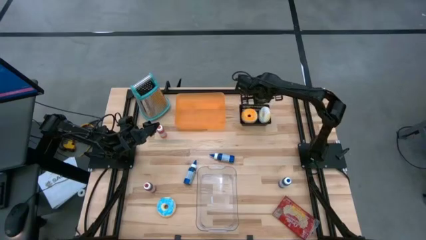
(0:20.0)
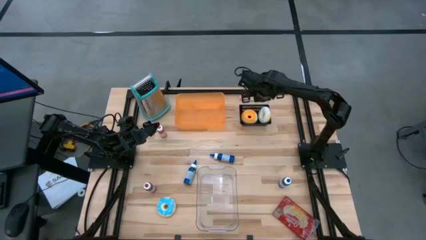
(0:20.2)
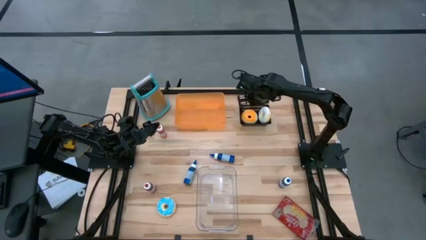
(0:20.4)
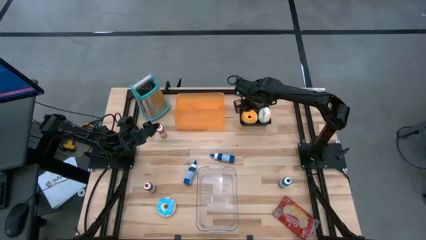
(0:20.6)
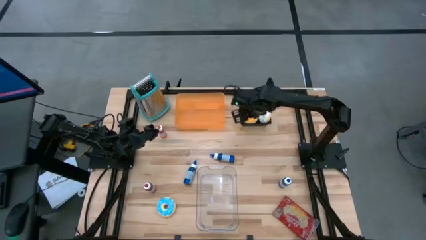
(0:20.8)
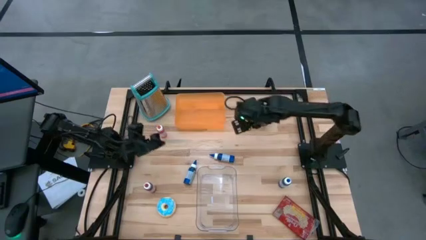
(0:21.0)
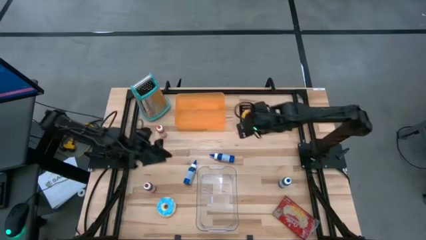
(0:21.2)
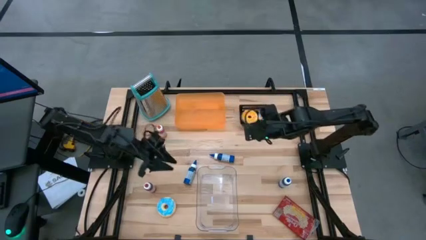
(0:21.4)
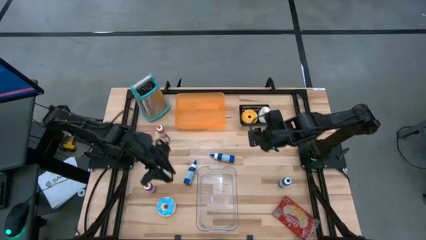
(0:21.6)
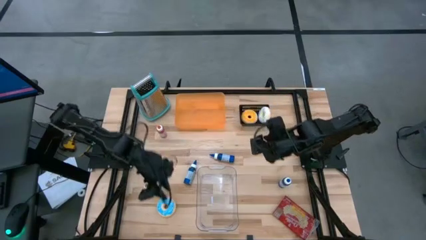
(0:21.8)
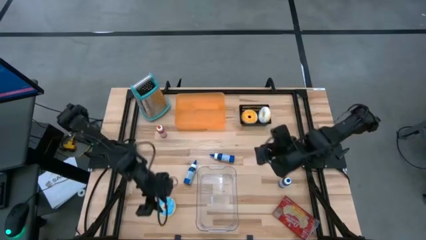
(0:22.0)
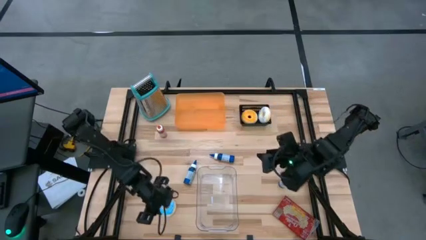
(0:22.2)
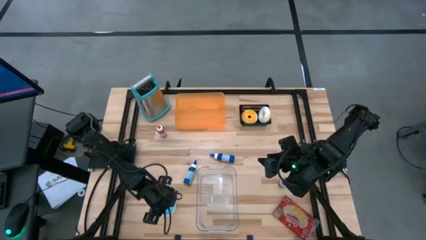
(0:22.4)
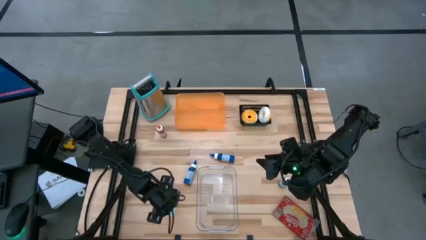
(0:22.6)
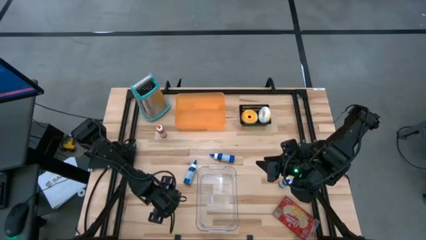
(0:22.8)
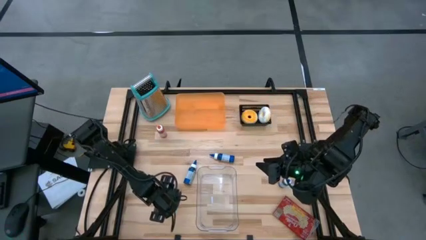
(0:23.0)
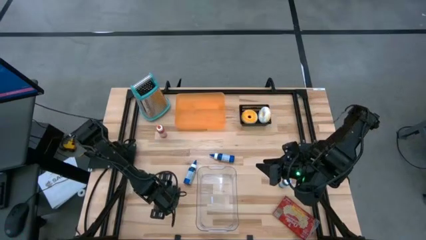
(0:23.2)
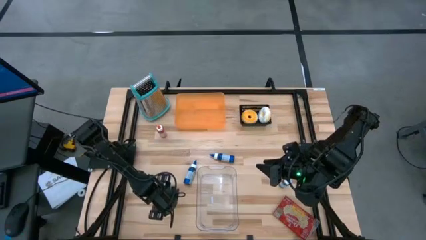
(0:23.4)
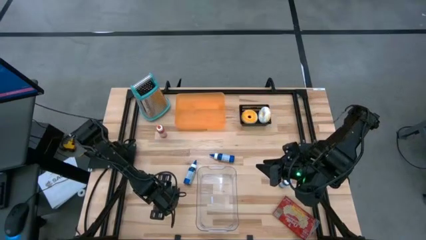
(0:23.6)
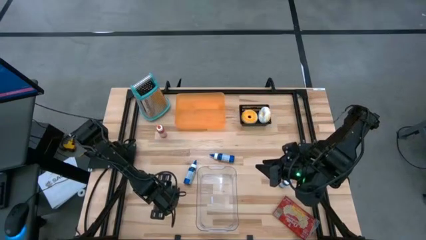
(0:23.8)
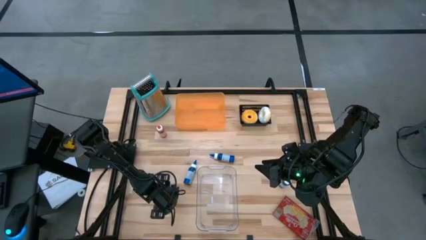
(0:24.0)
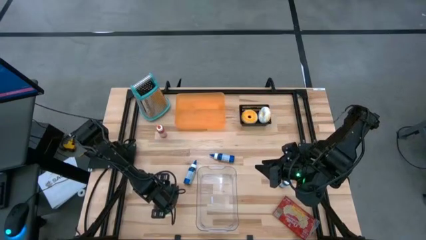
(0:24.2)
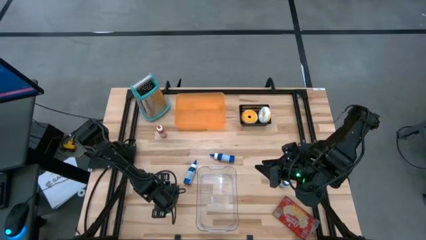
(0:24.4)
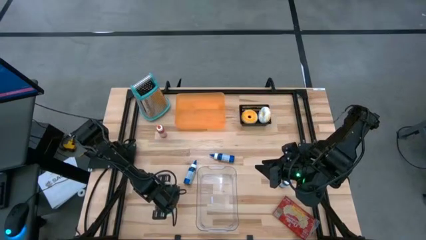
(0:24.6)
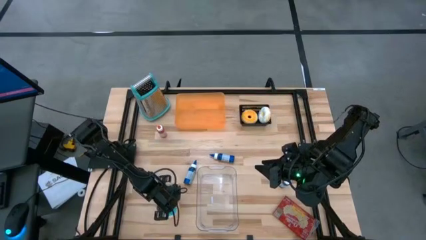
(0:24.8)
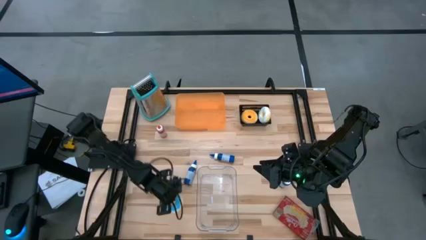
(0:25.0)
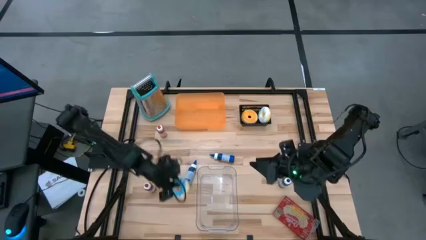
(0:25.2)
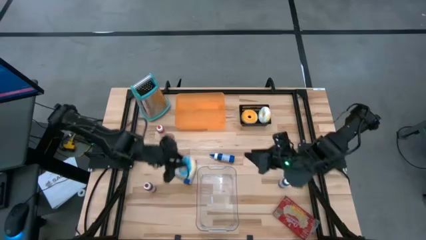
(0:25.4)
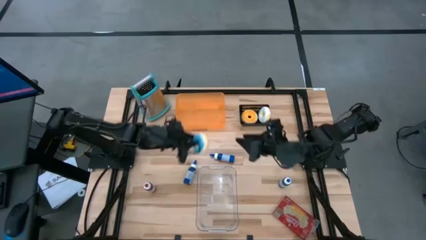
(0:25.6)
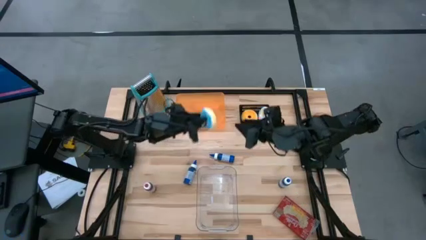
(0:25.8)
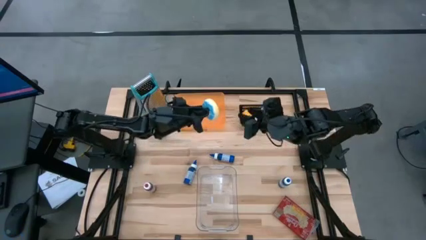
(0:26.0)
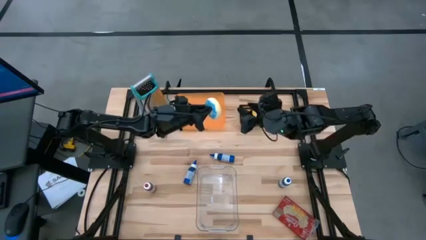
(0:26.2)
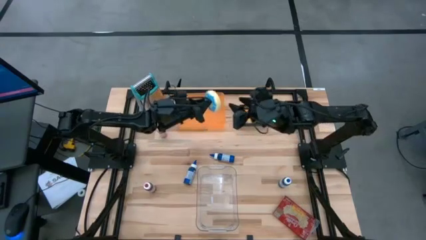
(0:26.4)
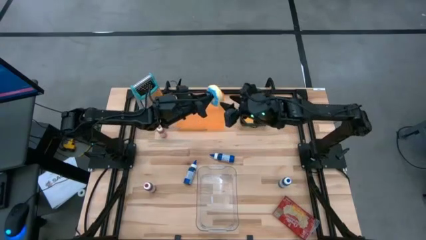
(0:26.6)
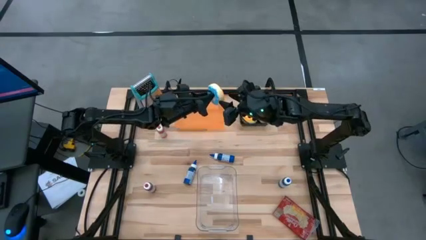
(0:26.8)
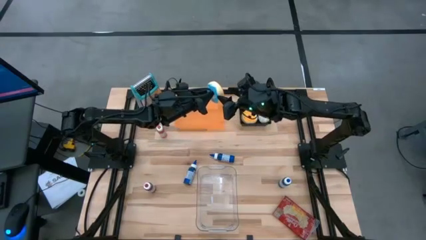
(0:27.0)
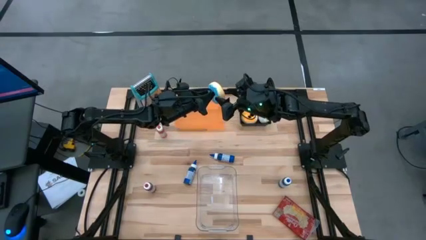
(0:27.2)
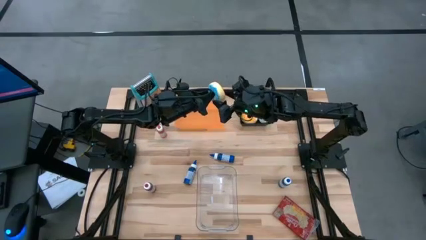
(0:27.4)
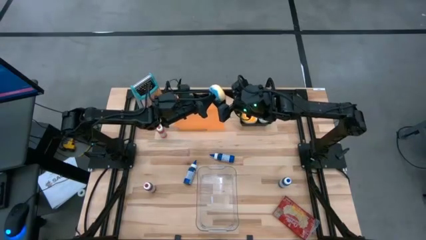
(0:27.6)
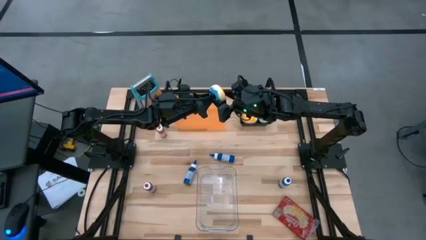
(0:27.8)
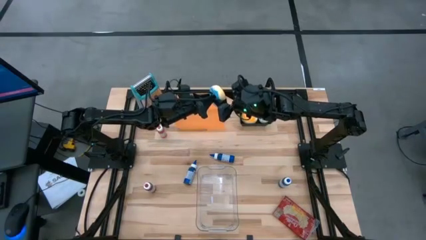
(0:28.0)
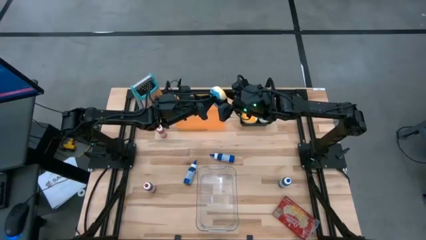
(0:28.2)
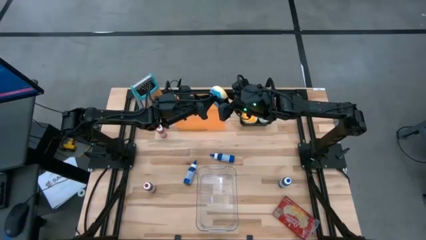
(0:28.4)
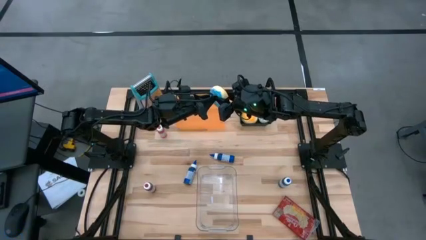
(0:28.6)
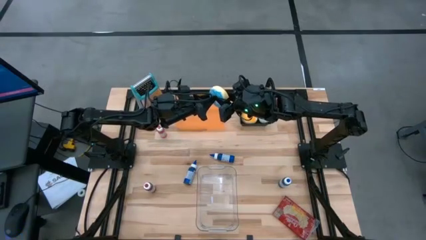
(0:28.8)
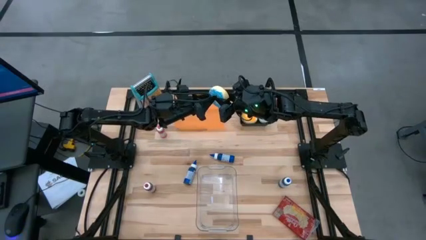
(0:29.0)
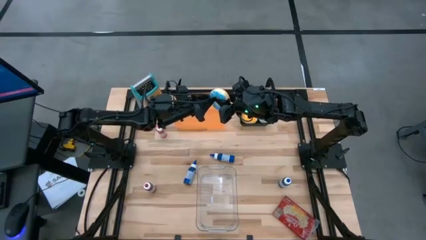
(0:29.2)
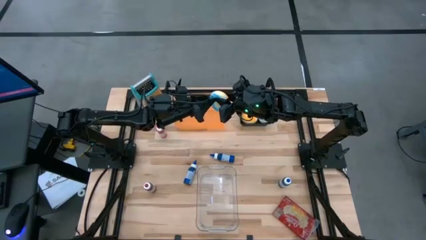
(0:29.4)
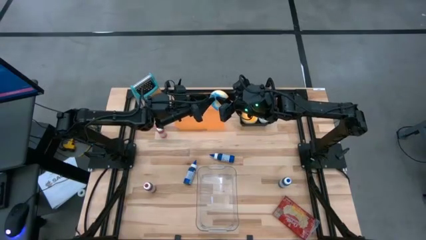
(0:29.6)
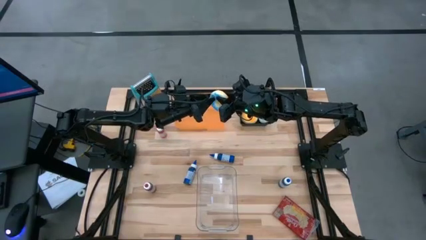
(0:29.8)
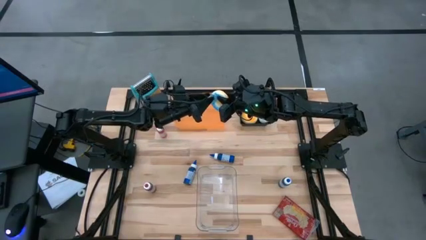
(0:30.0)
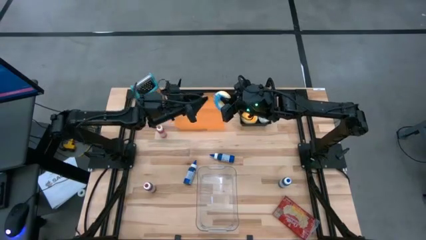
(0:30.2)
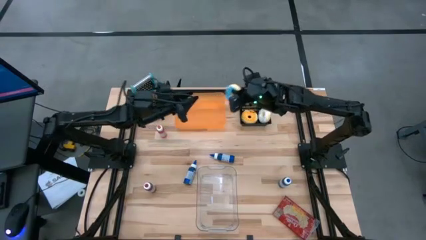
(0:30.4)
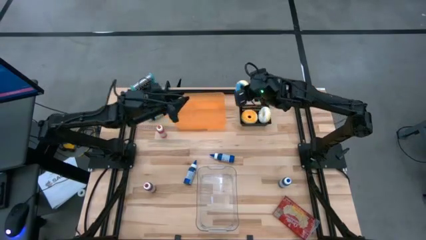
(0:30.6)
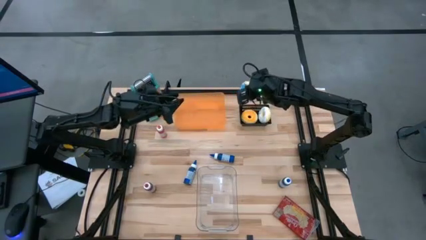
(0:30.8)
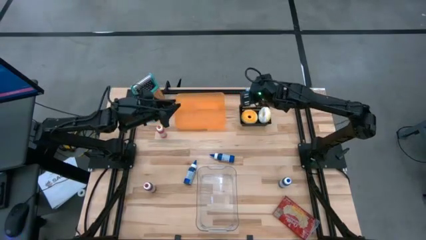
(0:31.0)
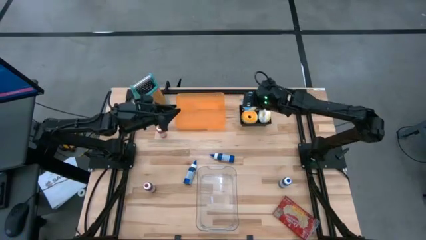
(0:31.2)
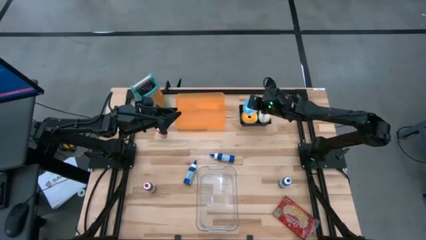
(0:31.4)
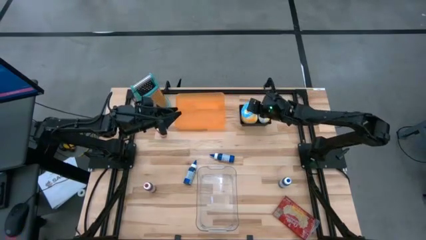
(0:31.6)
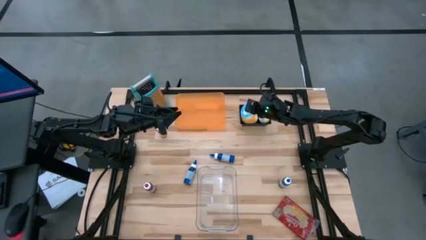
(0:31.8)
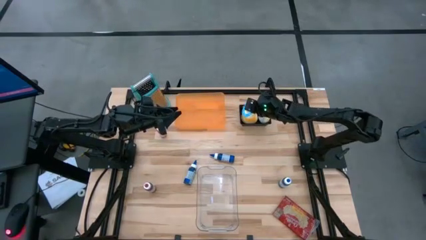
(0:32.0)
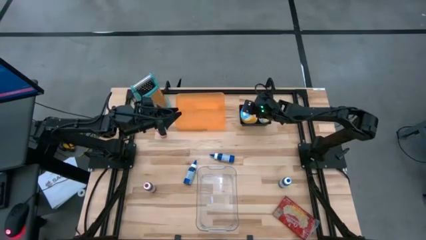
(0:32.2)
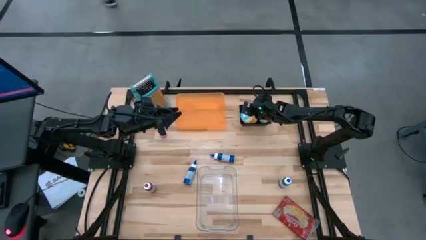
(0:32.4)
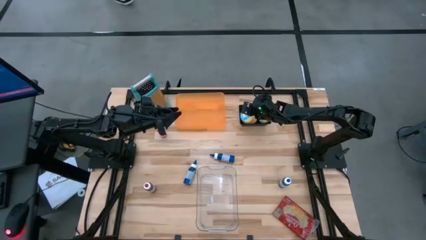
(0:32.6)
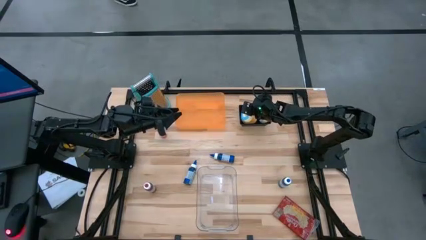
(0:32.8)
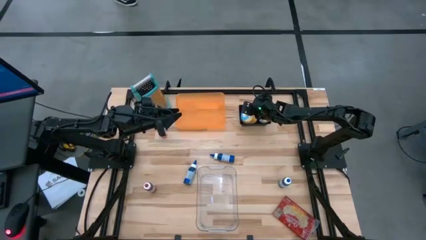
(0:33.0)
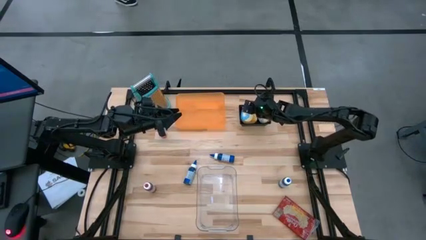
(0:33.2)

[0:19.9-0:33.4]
Put the blue doughnut into the black bin

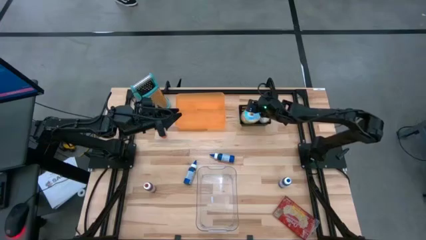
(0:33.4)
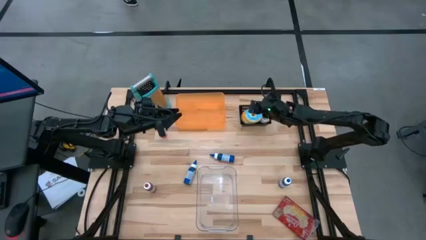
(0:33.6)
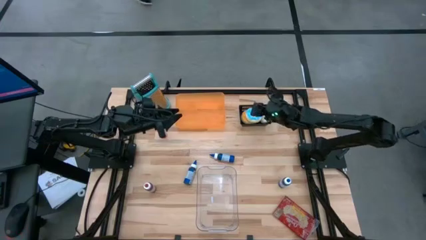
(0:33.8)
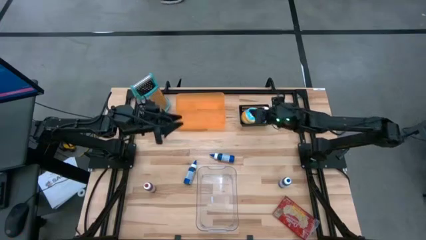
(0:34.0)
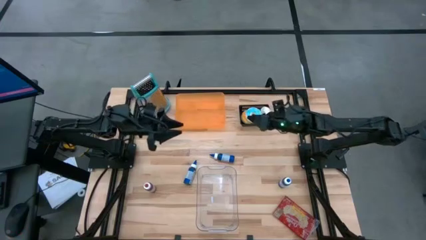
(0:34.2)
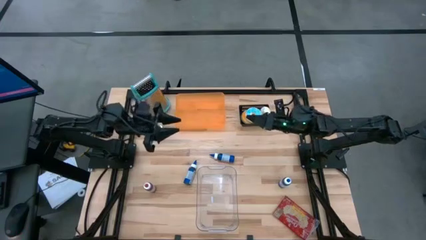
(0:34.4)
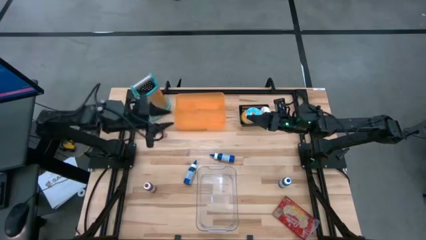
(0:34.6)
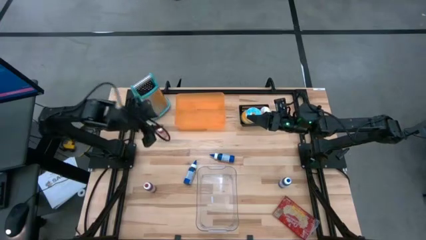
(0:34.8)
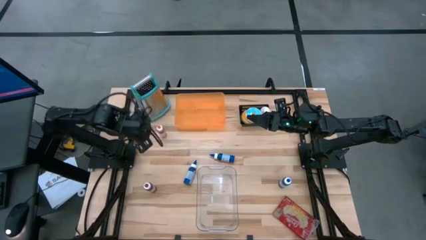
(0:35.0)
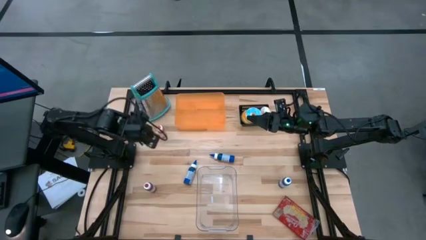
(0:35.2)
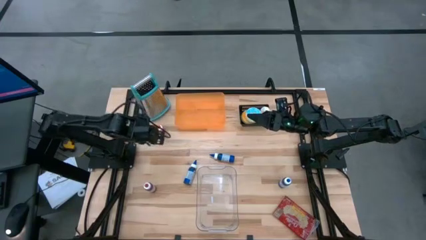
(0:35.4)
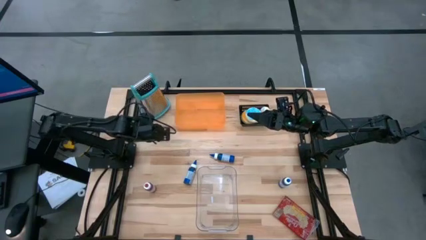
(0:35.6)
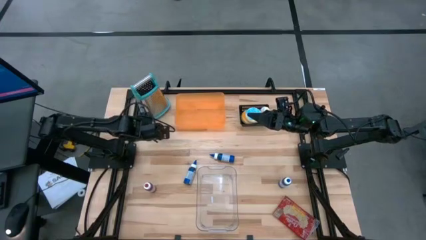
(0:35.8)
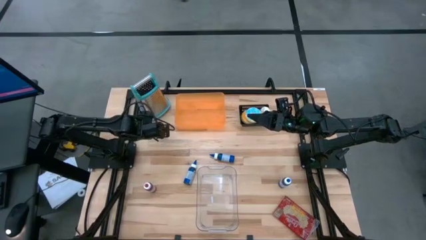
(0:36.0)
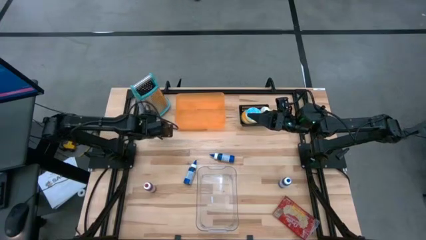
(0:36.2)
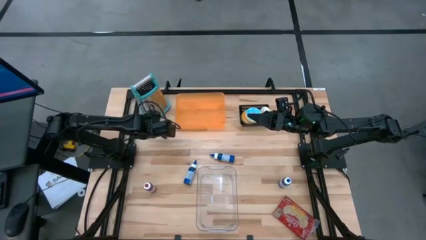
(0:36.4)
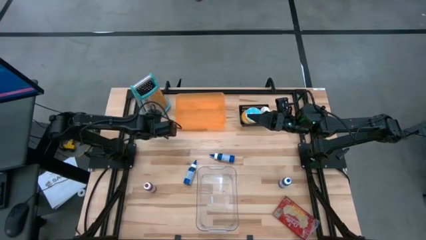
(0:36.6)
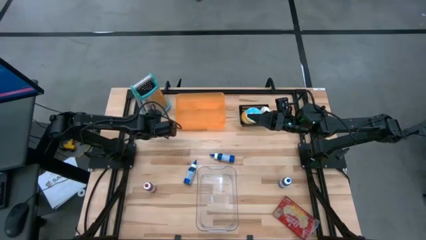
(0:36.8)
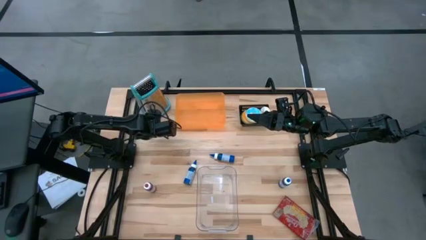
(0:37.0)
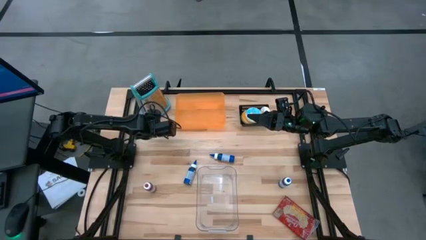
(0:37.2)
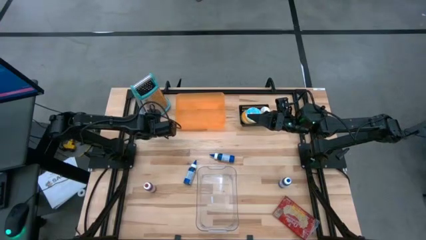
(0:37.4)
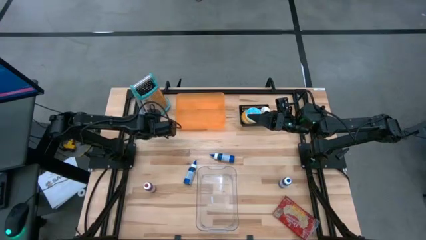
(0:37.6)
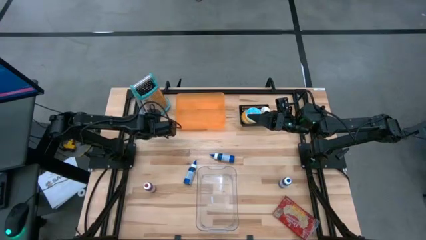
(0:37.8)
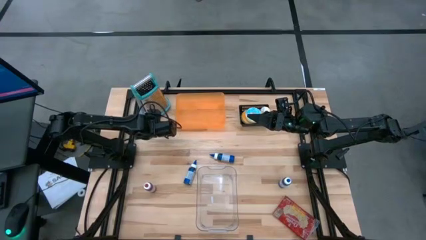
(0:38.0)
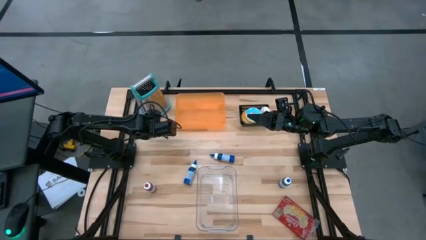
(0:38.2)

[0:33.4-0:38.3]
Put the orange food coloring bottle into the transparent bin
